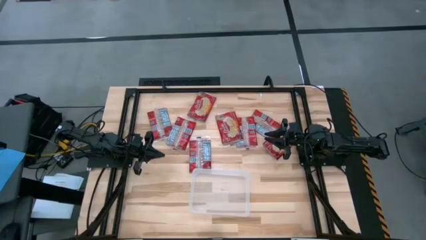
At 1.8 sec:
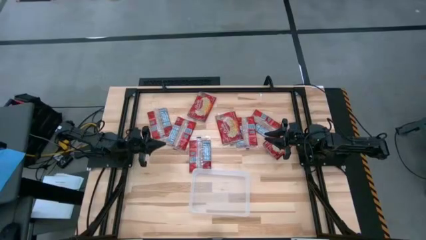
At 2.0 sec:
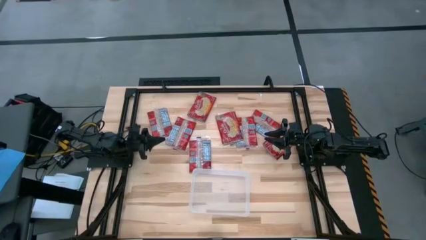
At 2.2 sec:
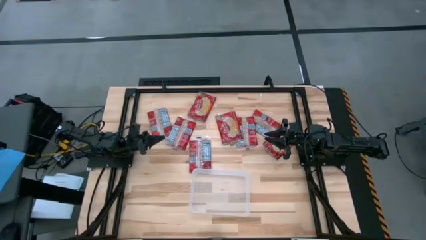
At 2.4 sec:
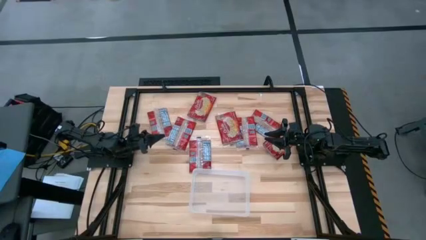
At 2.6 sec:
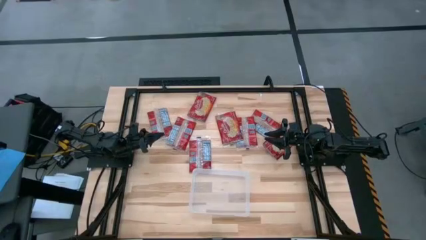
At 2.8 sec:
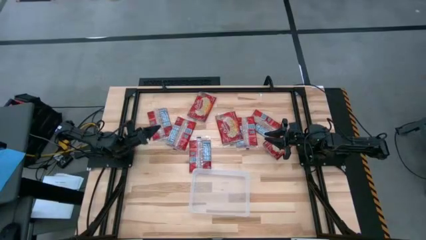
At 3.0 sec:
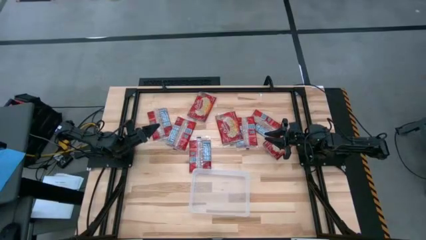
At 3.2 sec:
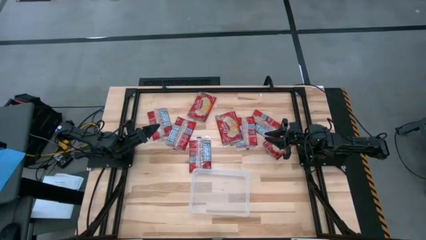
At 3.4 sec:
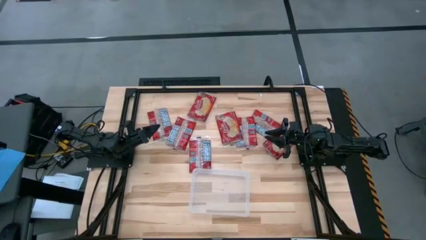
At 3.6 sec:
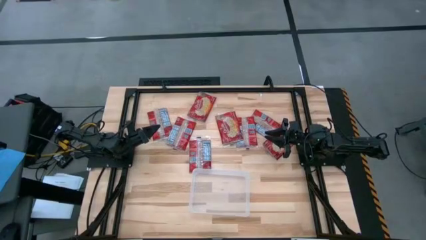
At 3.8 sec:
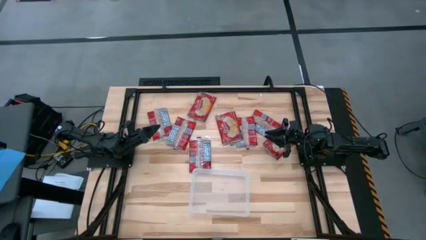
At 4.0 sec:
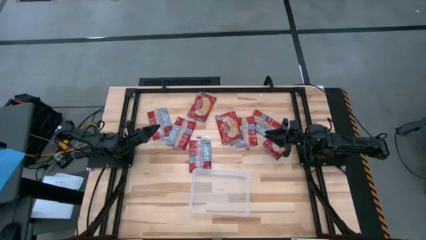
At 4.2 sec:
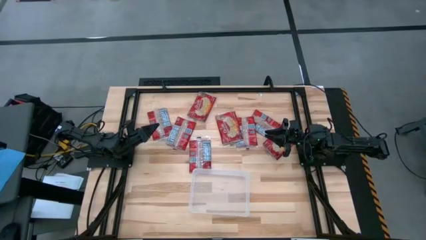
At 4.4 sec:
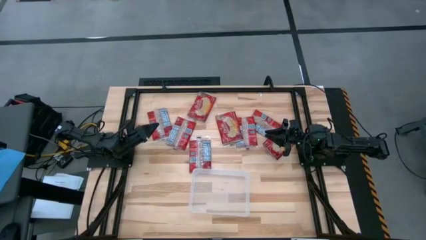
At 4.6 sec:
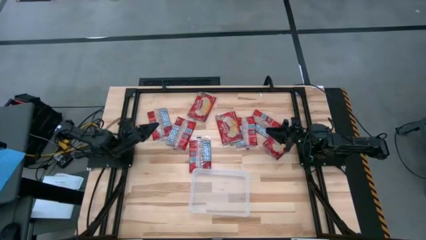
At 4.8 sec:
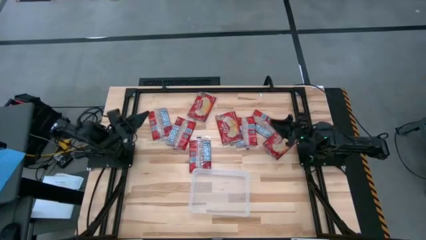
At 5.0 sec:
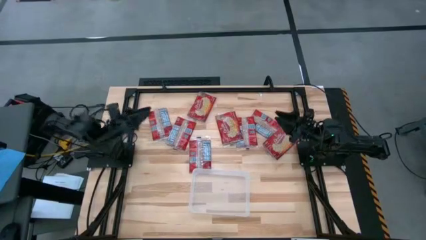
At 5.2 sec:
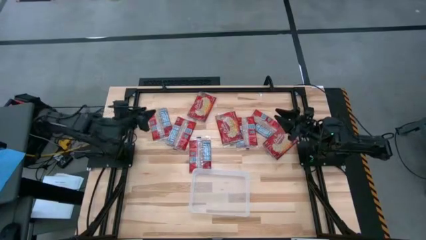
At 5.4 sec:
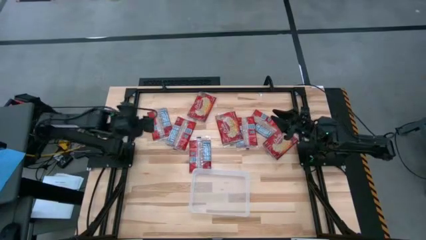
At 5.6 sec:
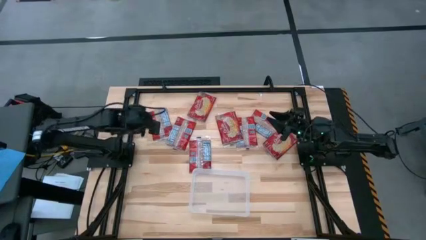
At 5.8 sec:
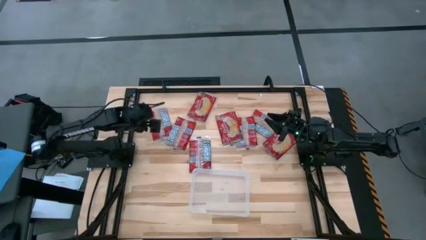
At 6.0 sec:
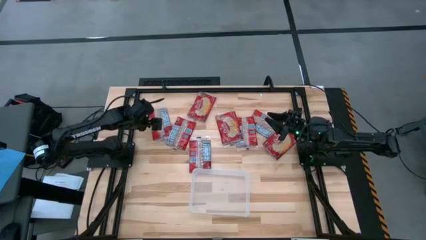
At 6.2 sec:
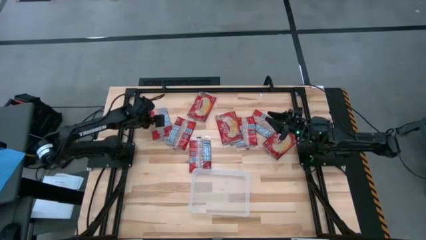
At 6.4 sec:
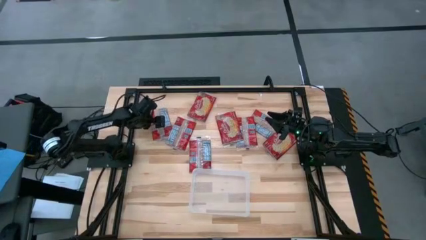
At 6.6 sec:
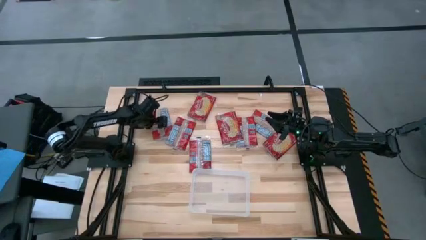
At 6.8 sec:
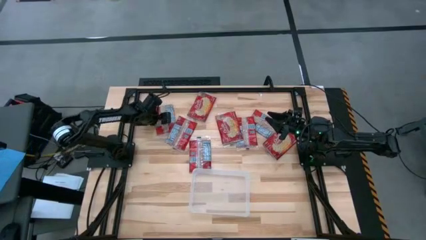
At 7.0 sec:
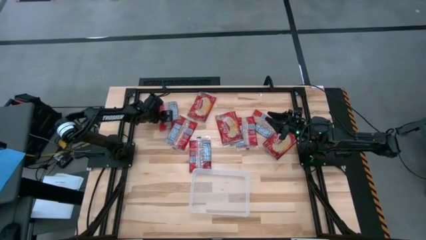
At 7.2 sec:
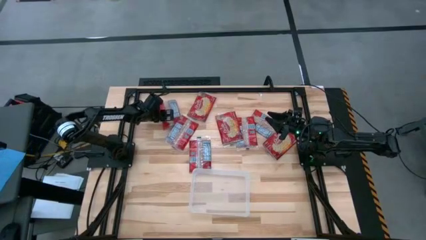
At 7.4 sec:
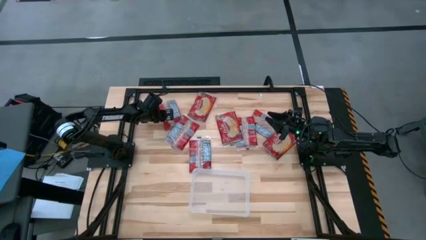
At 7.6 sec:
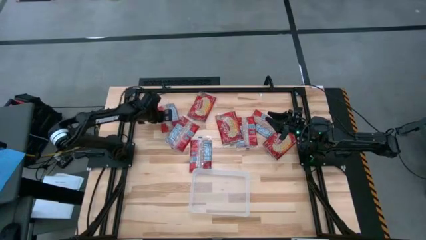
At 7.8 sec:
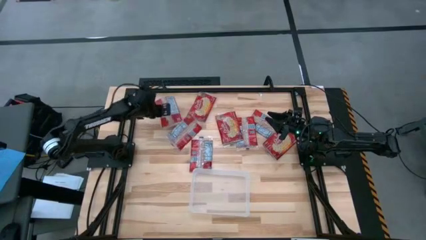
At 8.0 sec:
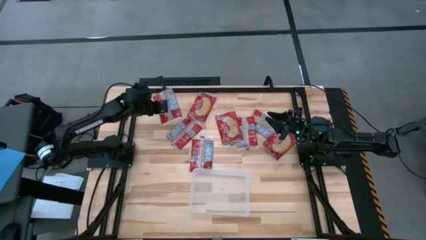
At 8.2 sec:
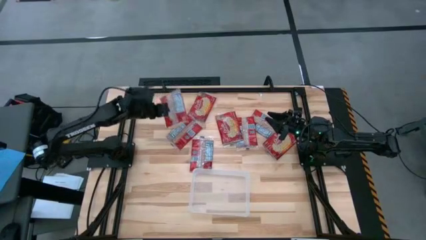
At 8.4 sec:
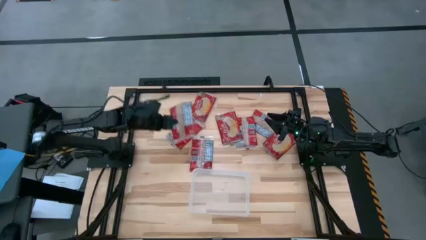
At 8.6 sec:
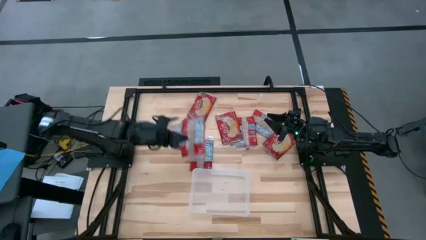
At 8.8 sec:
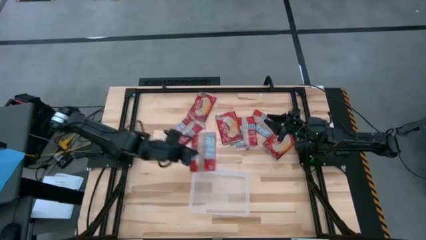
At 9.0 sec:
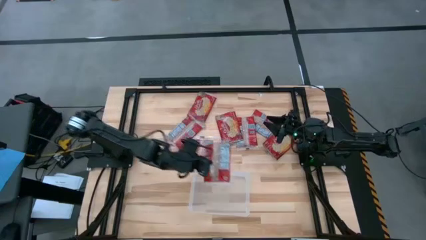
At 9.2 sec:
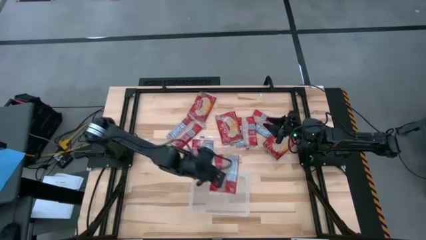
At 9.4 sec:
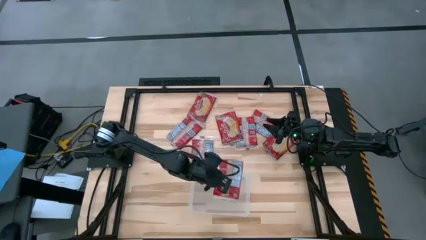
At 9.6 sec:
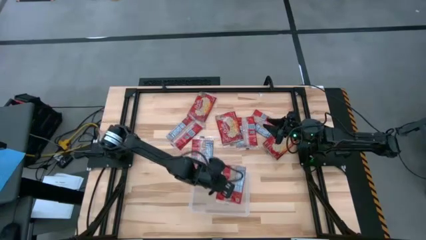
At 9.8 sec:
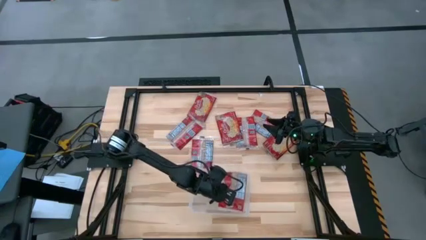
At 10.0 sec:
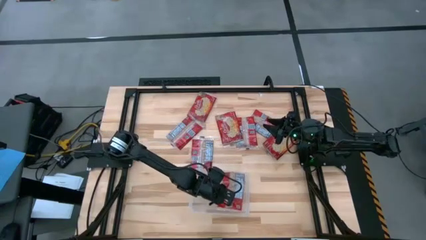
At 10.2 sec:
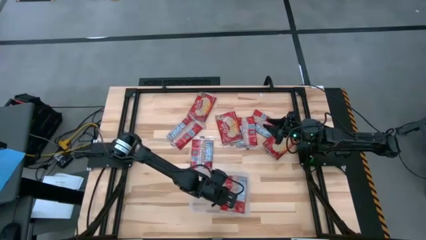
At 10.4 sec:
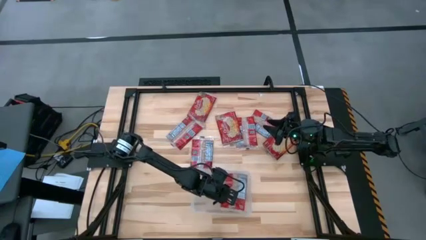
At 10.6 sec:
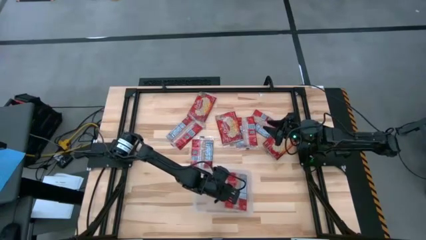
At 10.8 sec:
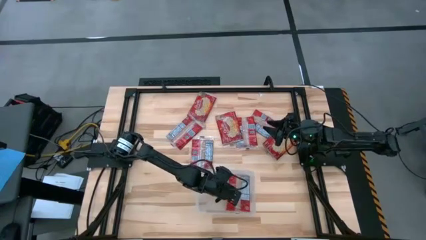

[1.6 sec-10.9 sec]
Task: Sort popcorn bags into baskets
Put the red popcorn bag into the white bin

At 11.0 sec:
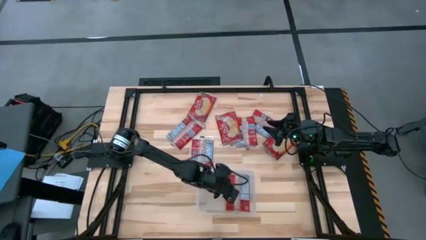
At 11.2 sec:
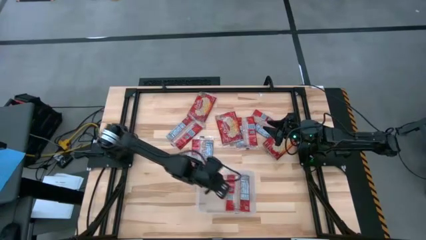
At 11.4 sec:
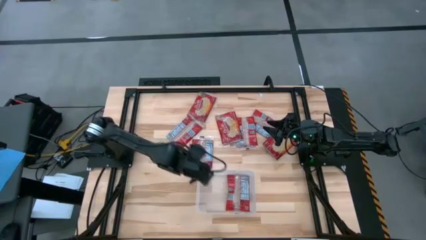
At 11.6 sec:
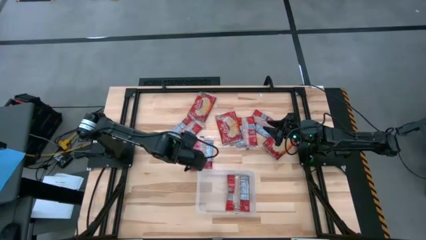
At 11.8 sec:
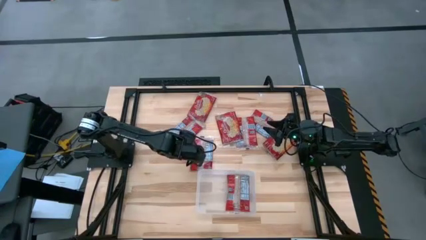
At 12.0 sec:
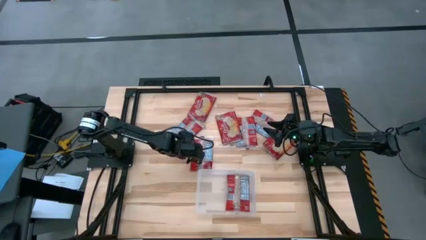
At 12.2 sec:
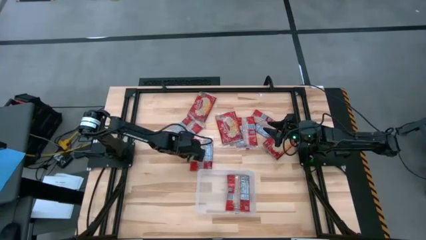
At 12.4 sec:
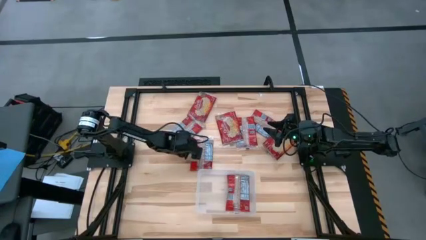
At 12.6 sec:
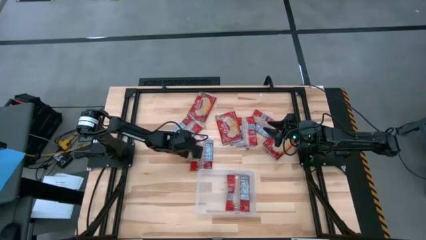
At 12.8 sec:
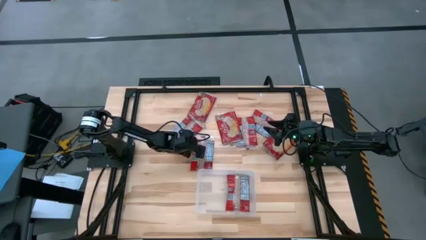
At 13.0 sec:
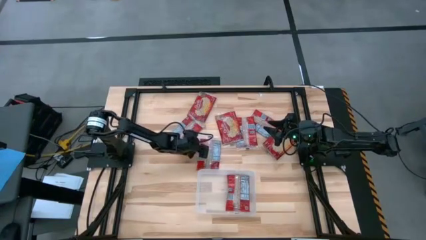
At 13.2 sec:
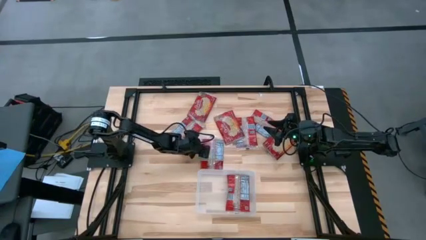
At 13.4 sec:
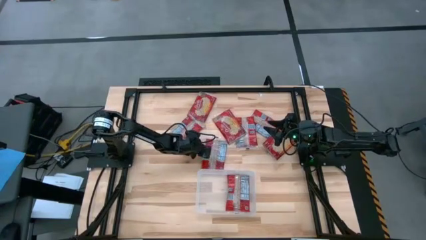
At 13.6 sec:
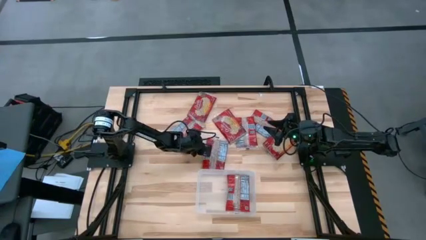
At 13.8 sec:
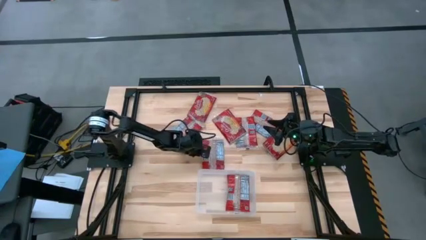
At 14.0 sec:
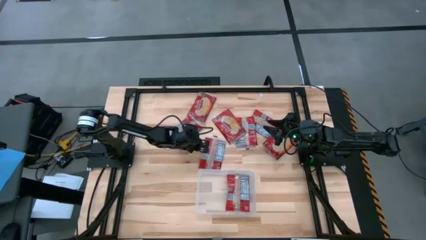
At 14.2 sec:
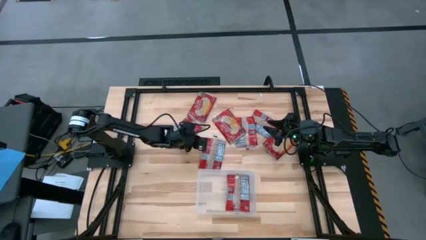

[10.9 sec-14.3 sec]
Put the red popcorn bag into the white bin

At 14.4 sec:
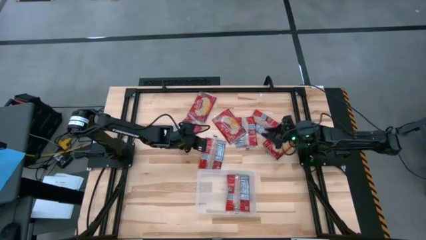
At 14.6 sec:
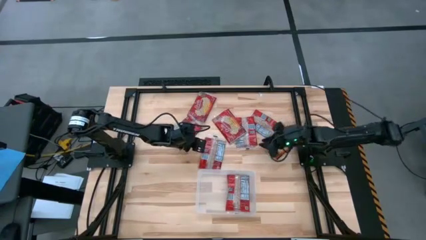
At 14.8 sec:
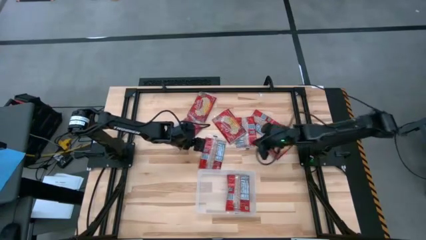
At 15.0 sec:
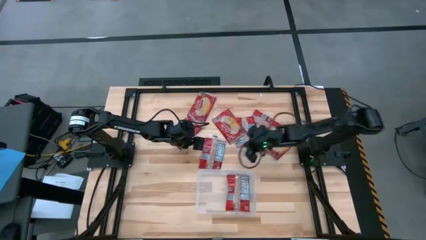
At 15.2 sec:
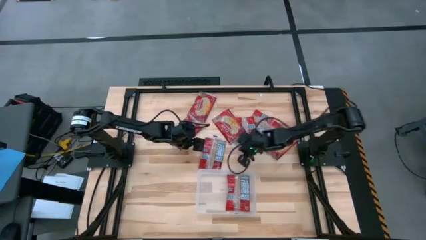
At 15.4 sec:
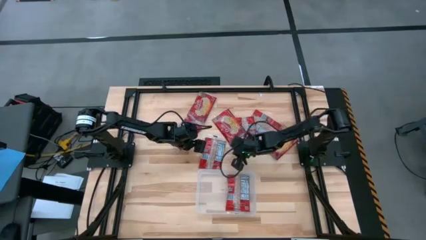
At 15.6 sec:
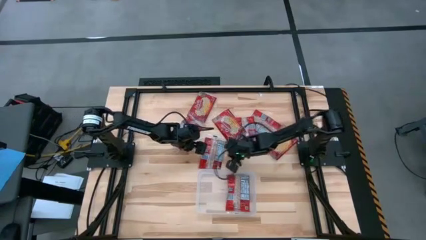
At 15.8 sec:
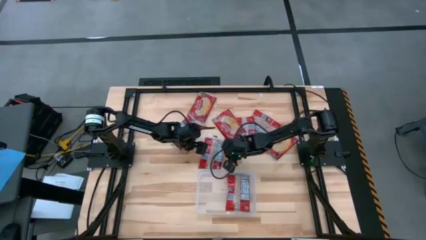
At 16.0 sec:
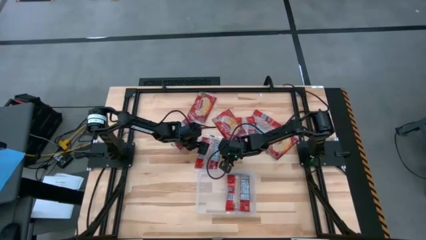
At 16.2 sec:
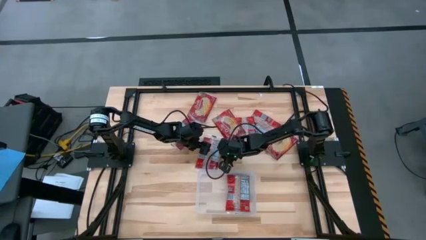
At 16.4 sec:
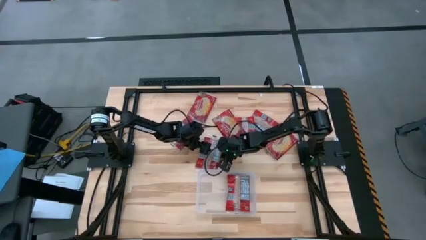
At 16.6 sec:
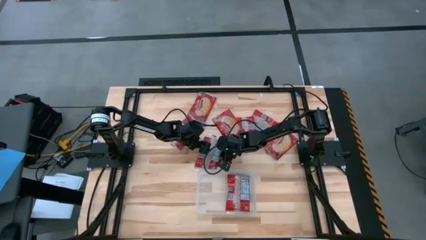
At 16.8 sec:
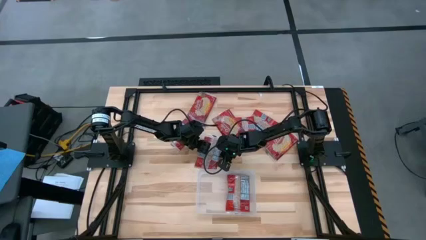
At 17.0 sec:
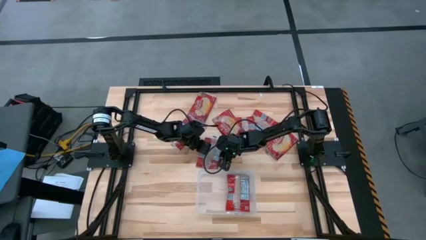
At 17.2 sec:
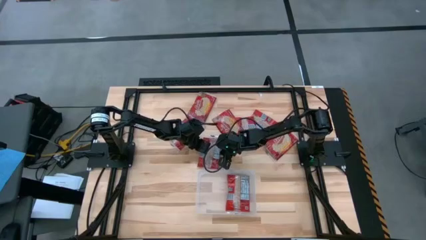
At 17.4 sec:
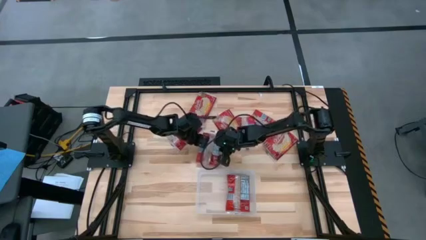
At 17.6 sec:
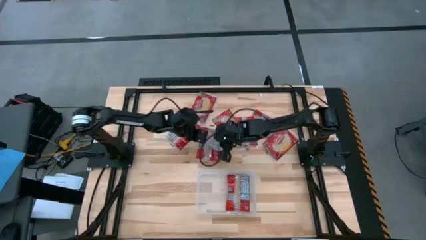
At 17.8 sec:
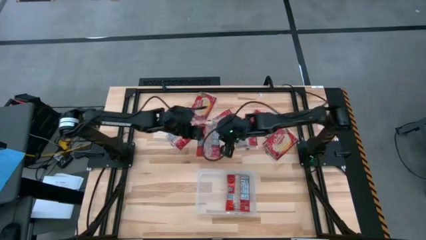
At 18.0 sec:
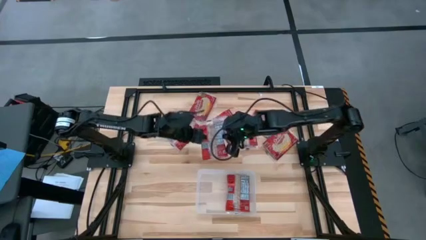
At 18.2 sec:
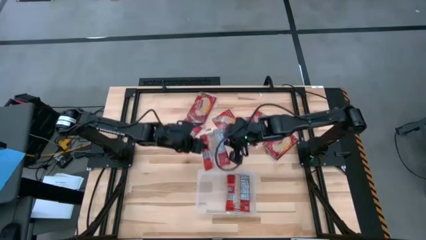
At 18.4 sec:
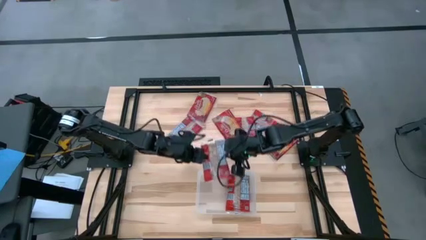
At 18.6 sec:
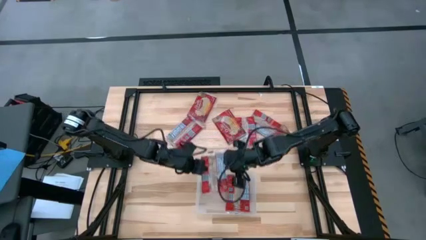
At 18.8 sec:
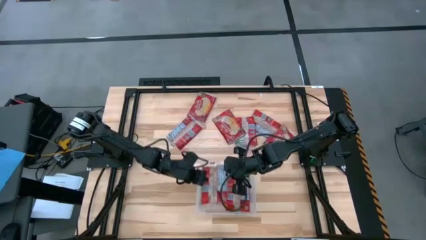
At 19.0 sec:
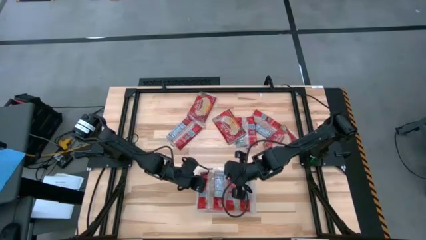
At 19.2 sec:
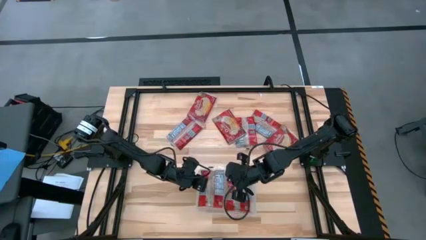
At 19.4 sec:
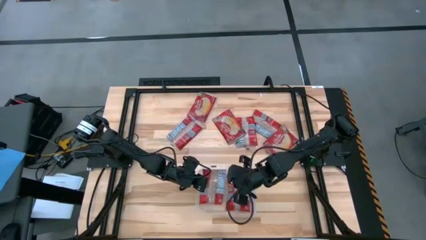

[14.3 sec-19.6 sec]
Put the red popcorn bag into the white bin
